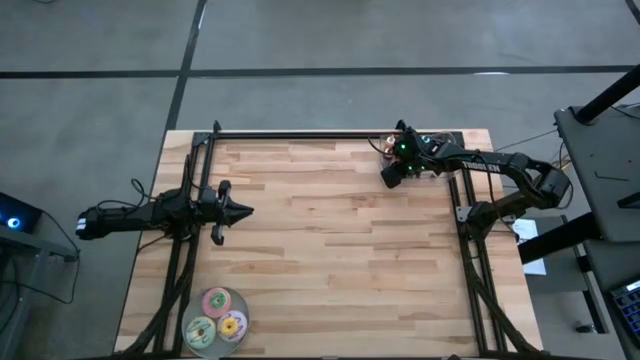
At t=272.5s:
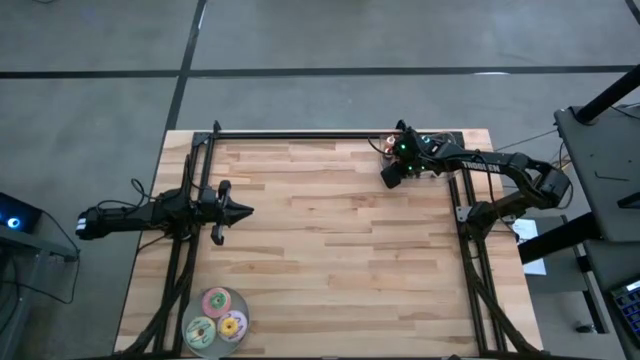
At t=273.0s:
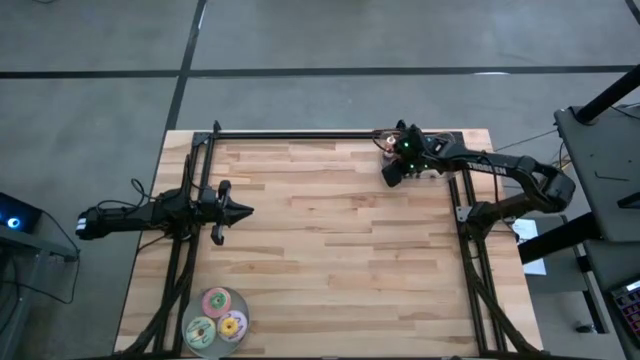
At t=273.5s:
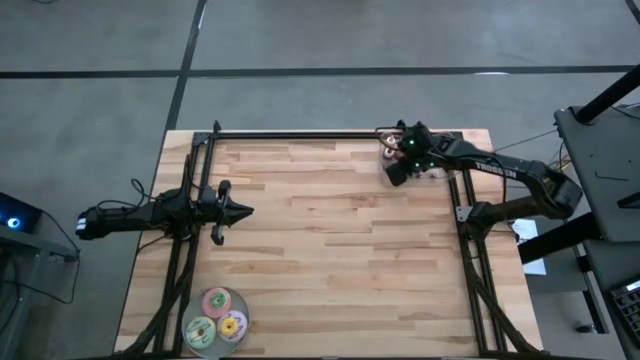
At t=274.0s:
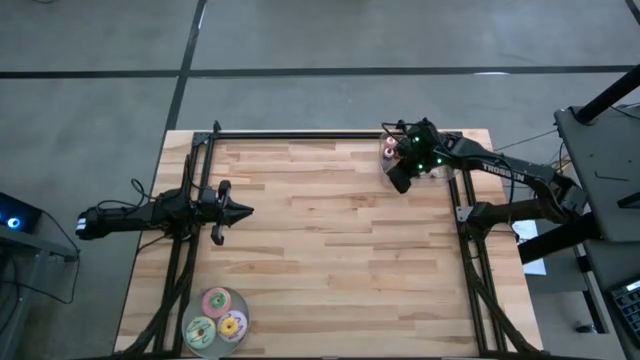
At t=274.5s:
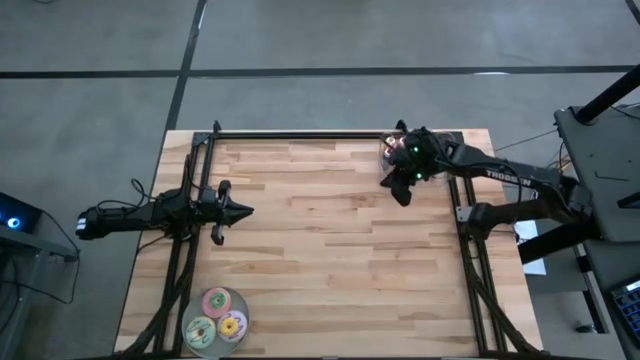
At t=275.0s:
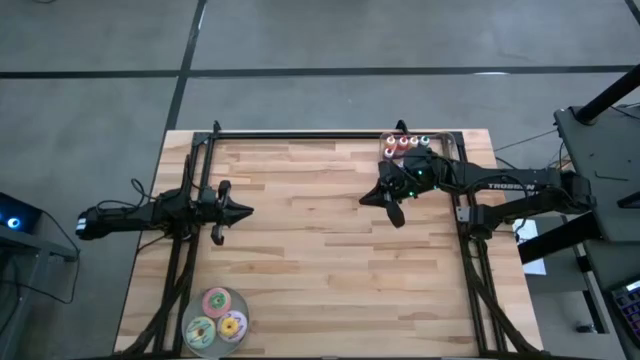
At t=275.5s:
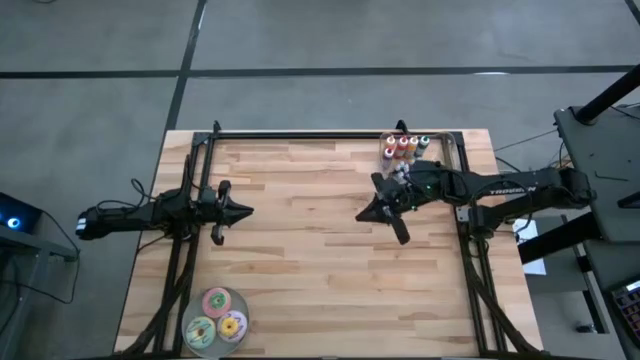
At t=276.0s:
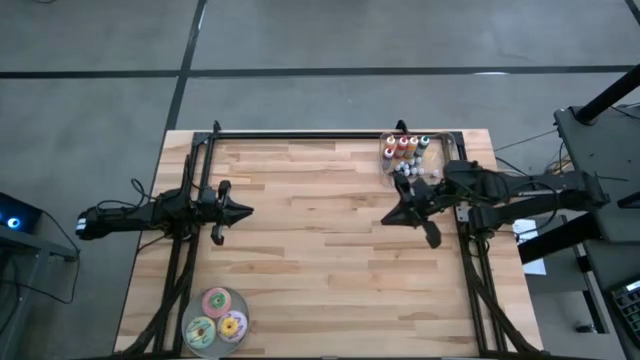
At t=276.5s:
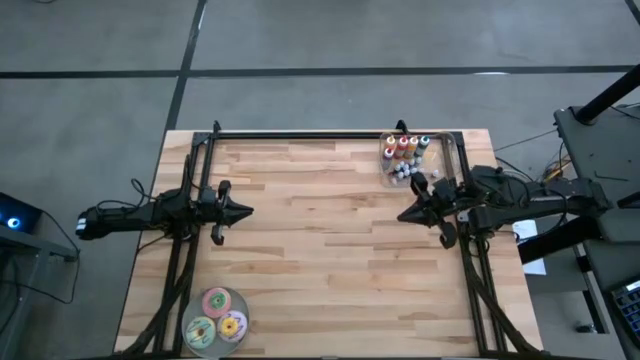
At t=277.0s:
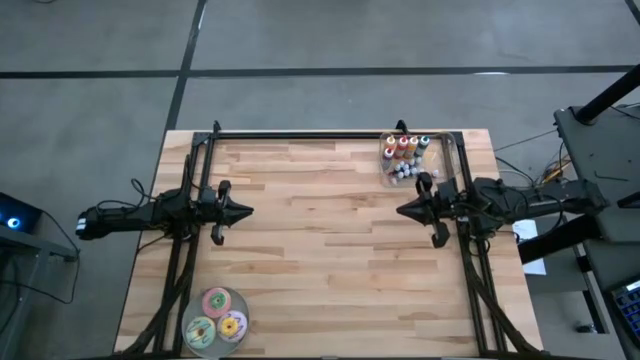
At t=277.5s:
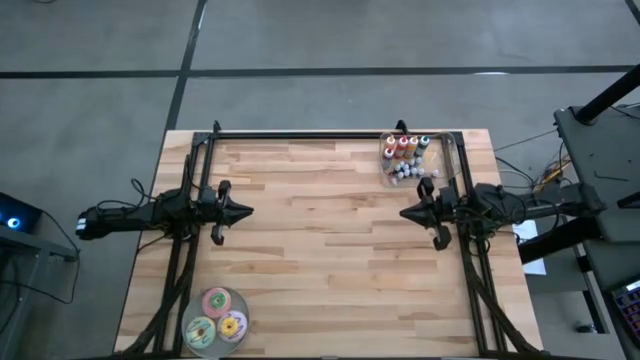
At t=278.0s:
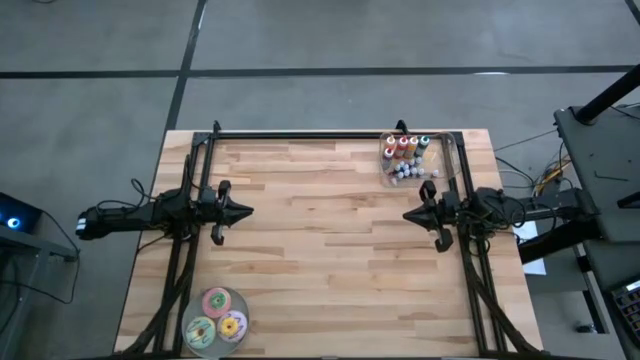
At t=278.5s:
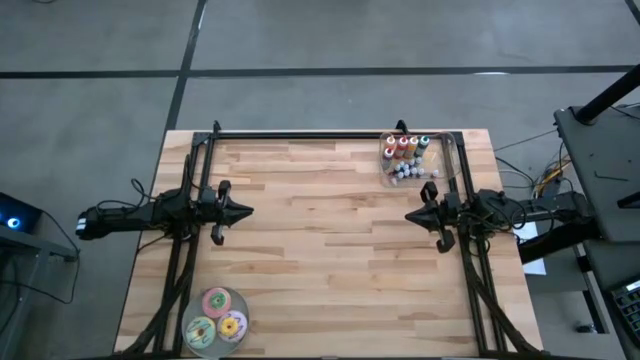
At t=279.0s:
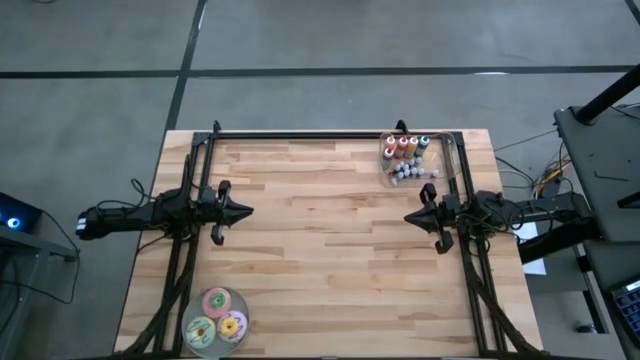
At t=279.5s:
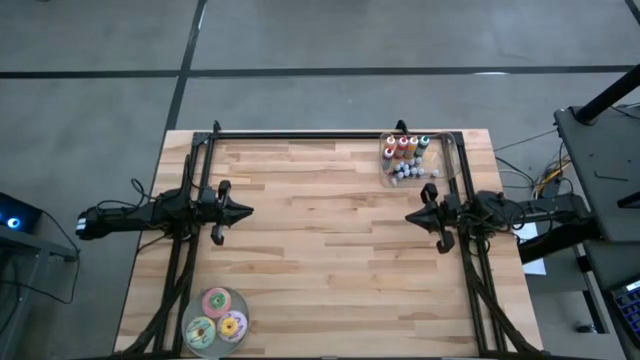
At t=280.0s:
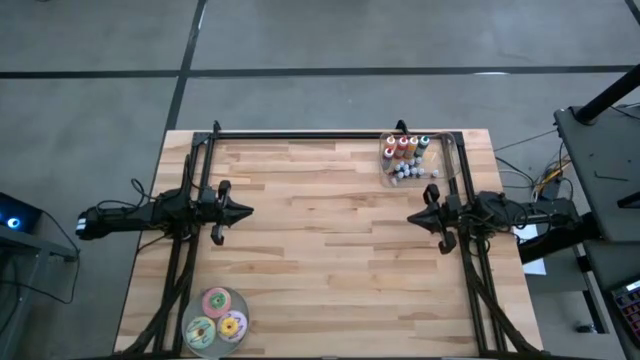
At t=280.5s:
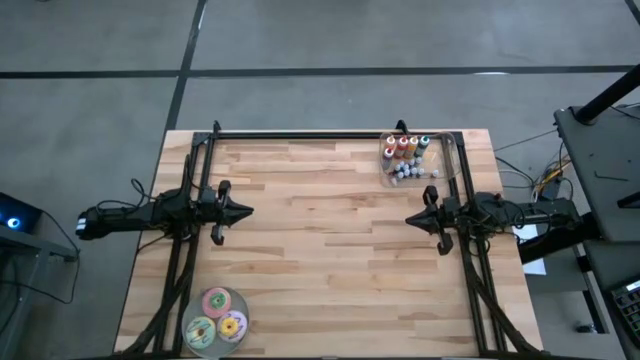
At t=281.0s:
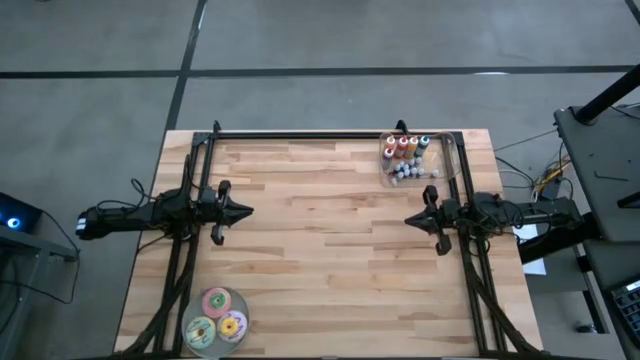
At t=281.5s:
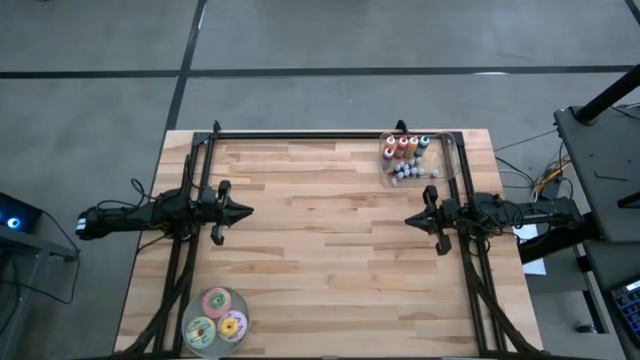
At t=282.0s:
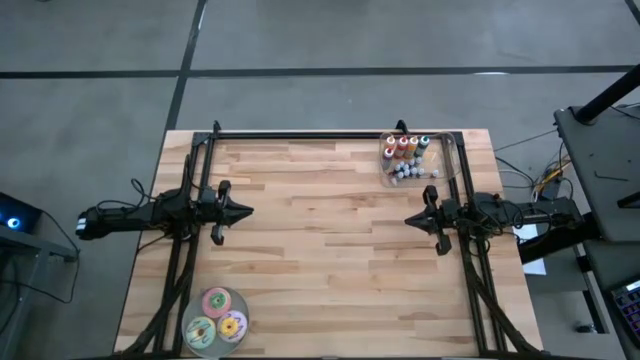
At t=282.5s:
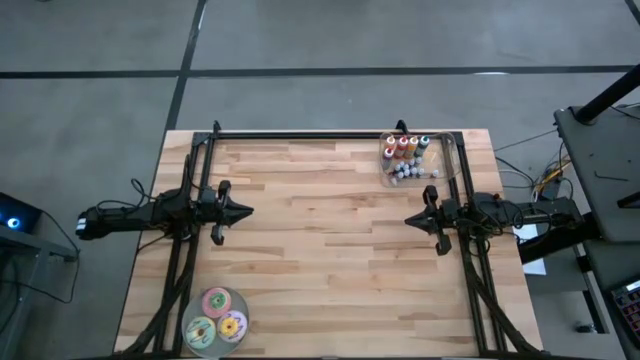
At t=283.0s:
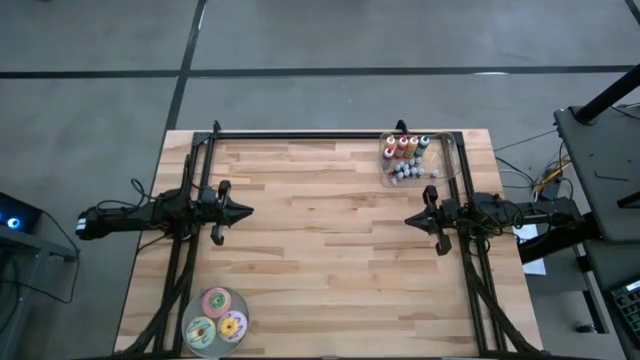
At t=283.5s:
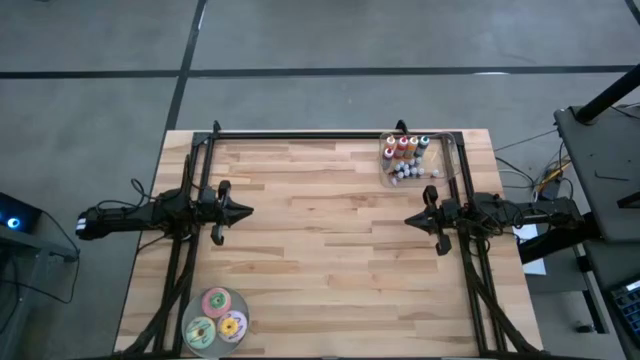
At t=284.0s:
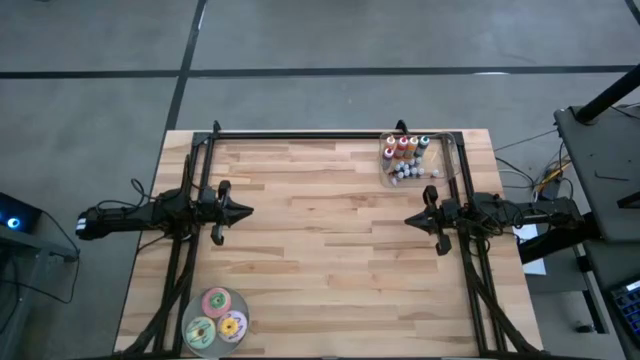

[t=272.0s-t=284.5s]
Task: Pick & Place food coloring
Return to Home Position

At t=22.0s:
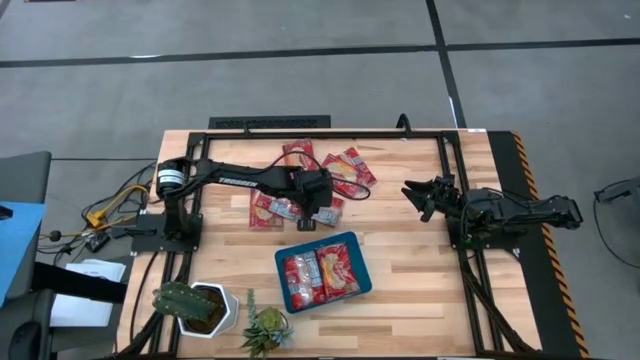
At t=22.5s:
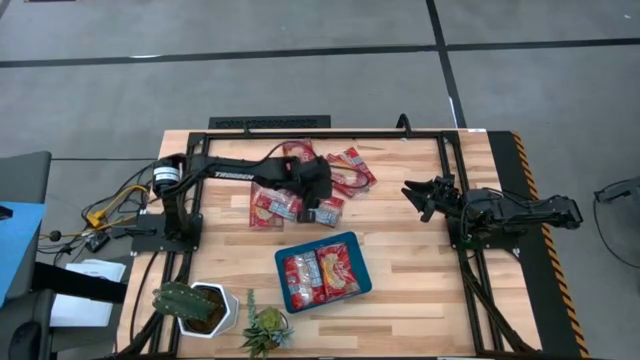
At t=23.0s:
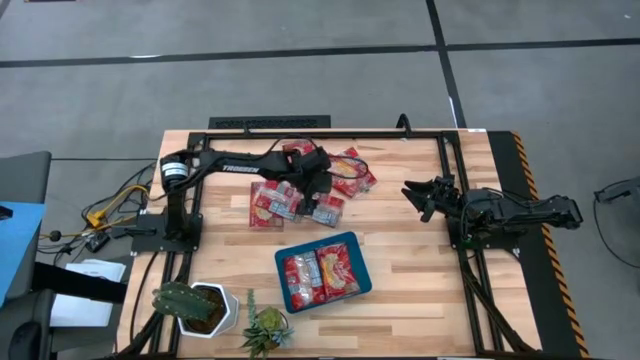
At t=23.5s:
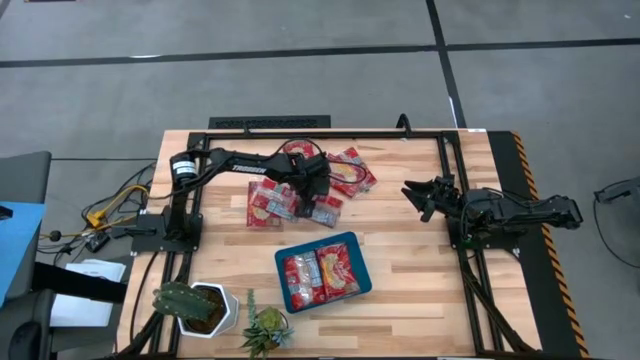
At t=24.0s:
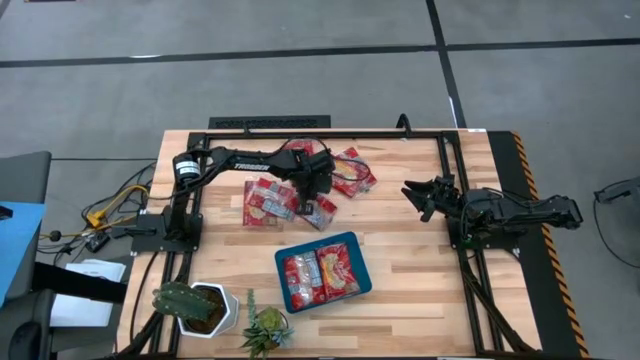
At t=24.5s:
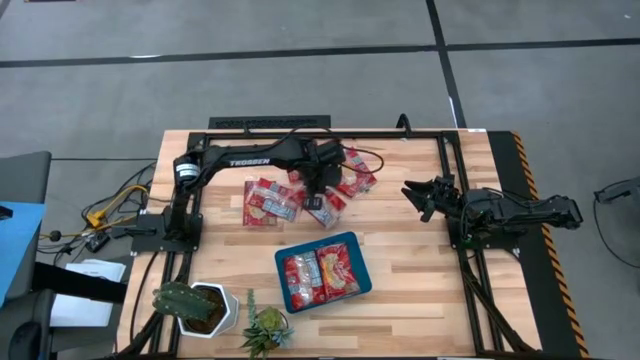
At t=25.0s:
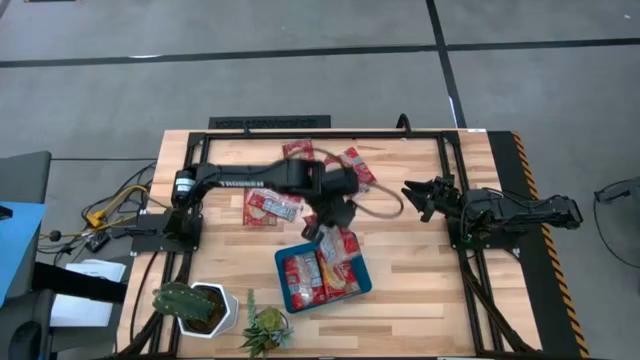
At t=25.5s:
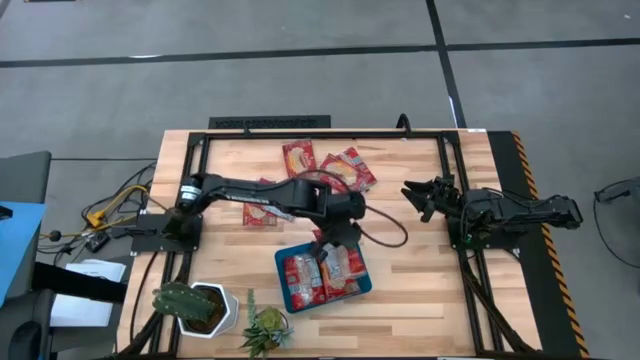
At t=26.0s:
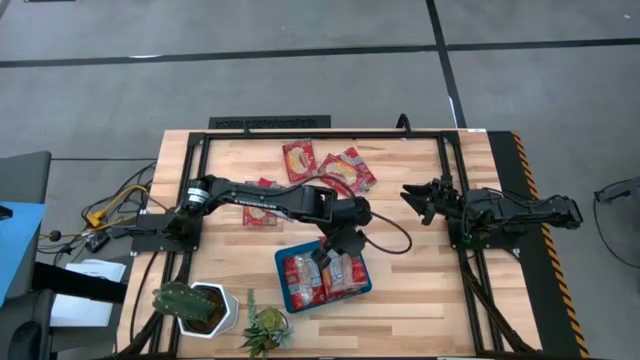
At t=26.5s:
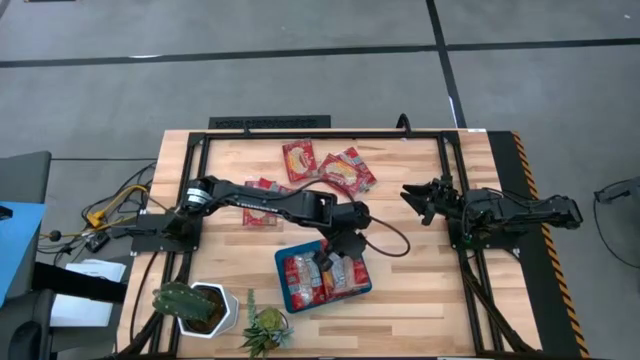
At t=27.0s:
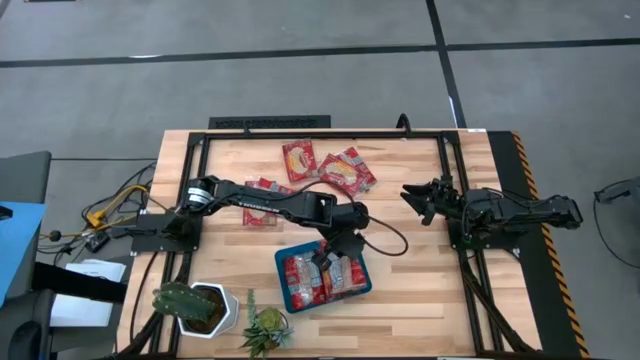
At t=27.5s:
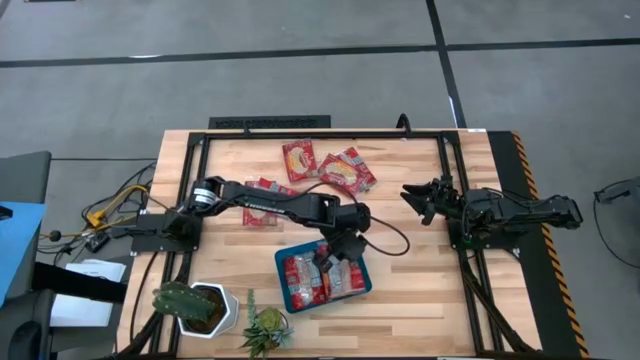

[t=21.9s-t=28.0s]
Task: Sort popcorn bags into baskets
Put the popcorn bag into the blue bin

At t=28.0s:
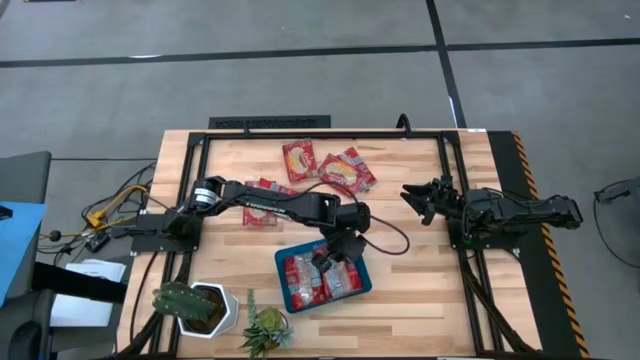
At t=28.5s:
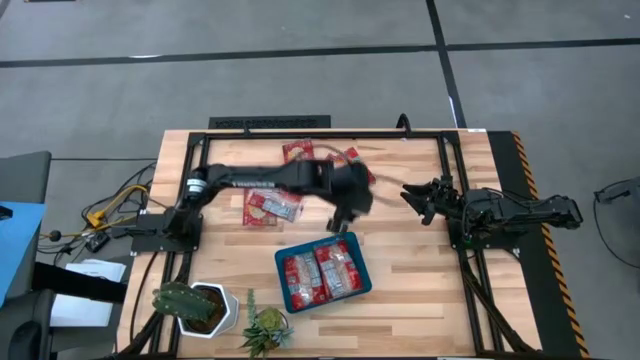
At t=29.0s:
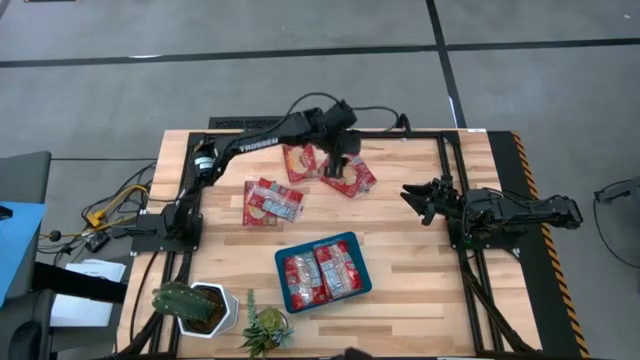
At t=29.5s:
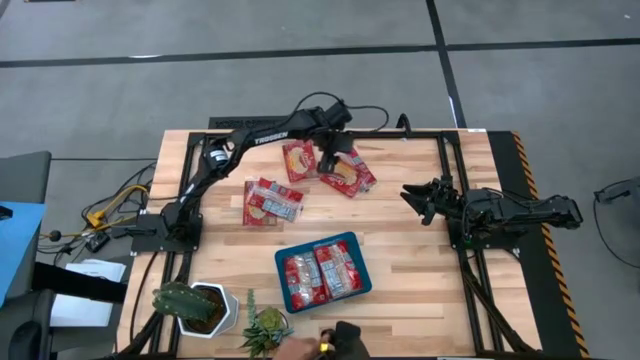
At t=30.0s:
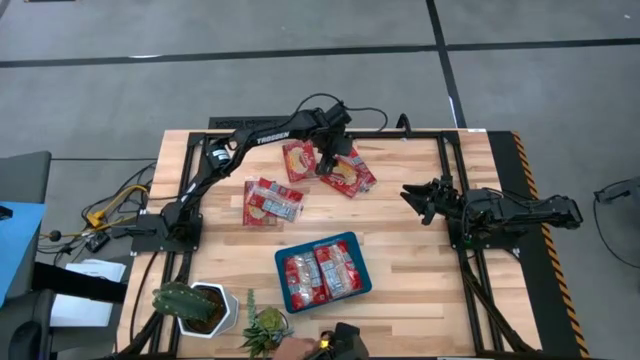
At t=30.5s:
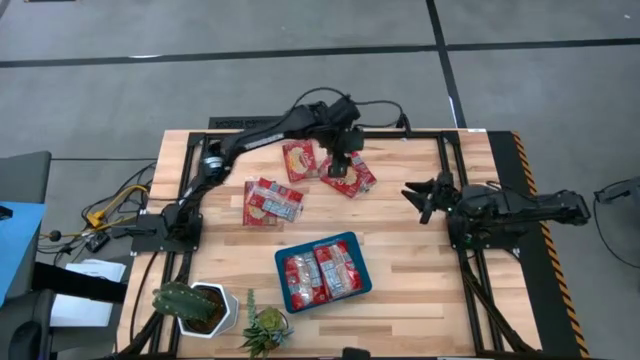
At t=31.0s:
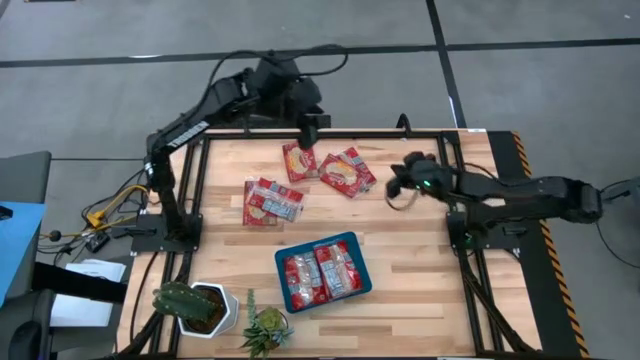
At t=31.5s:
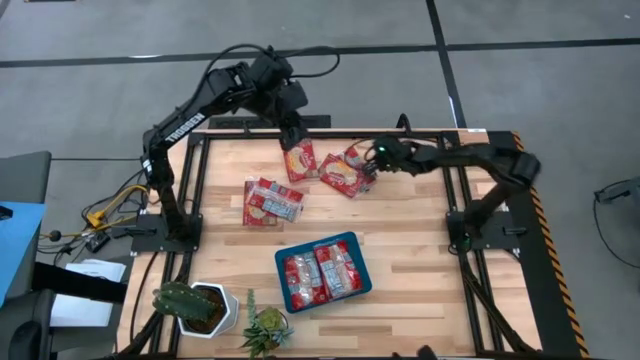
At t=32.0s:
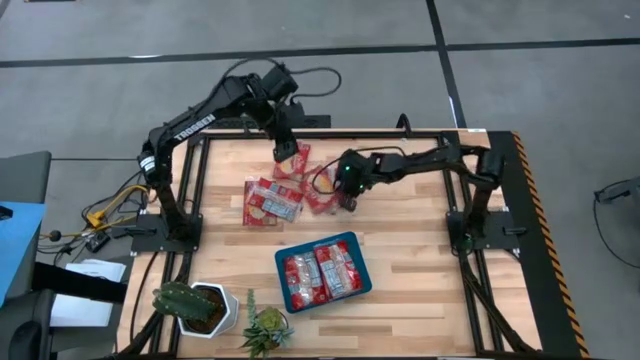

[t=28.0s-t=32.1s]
Put the popcorn bag into the blue bin
